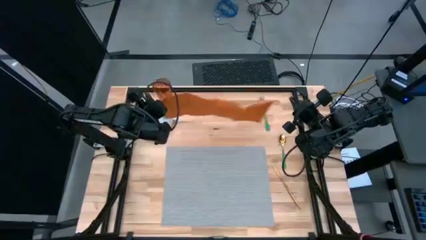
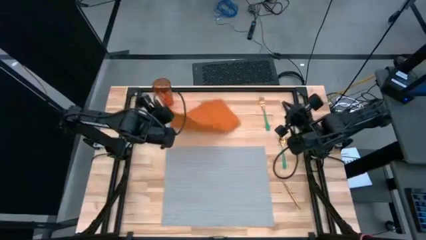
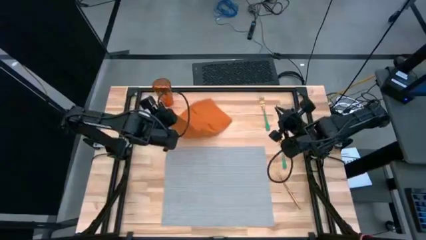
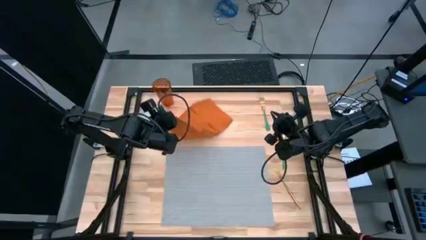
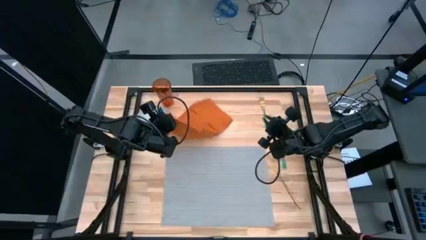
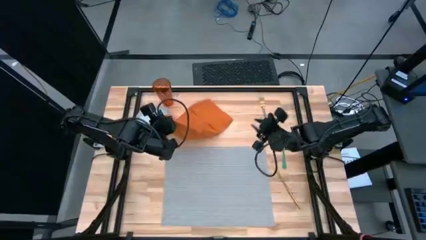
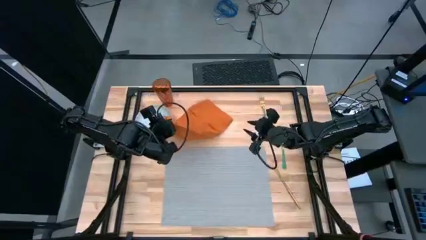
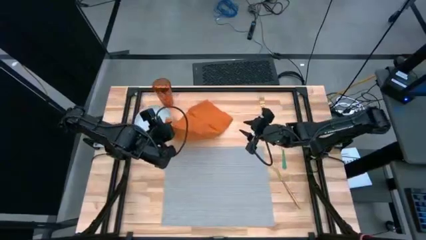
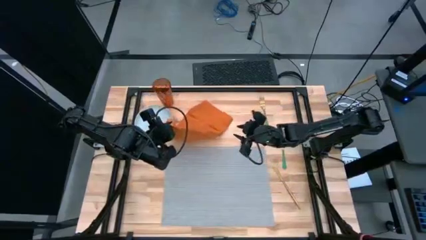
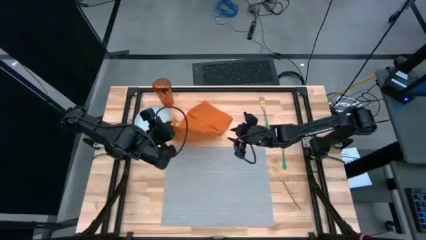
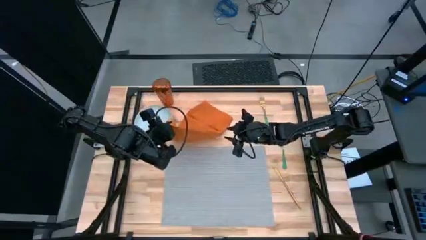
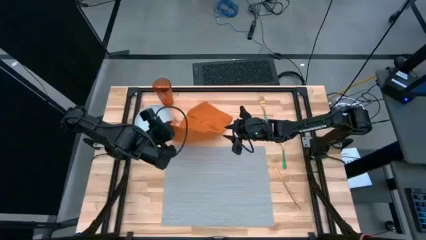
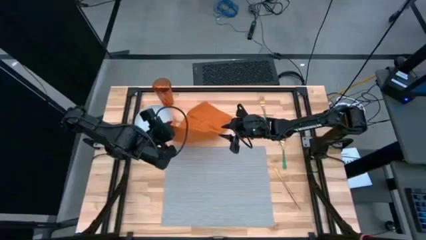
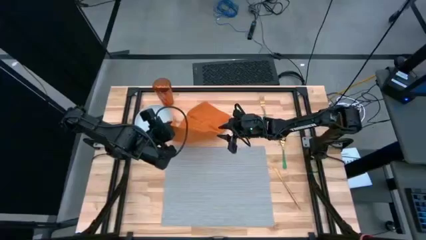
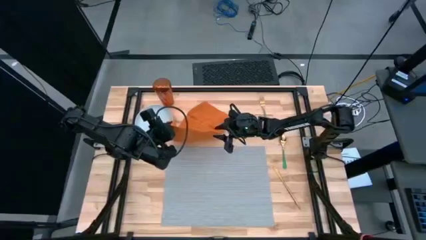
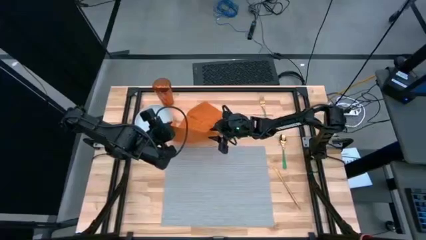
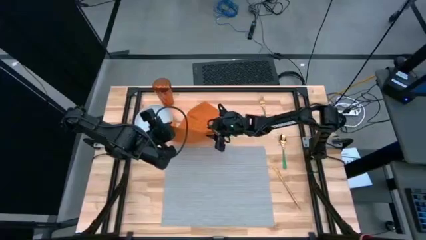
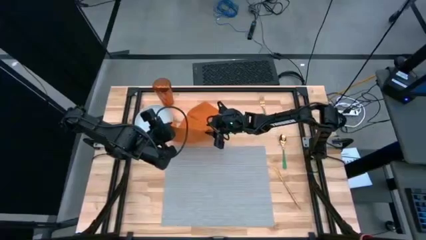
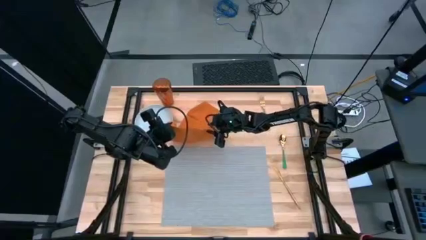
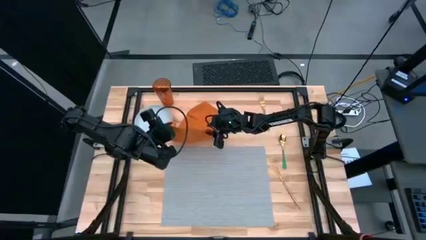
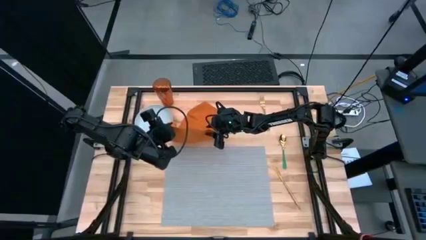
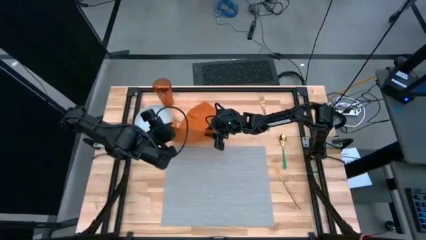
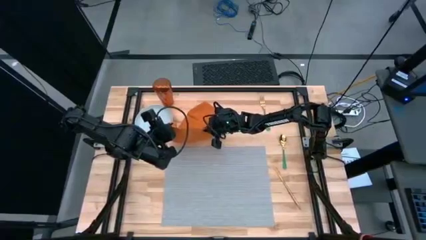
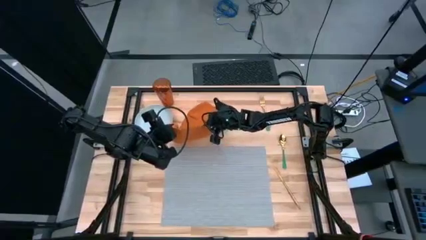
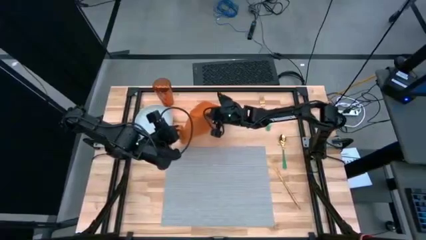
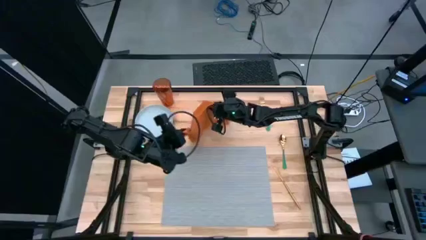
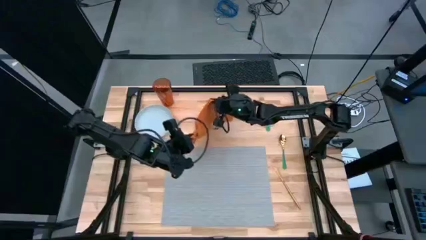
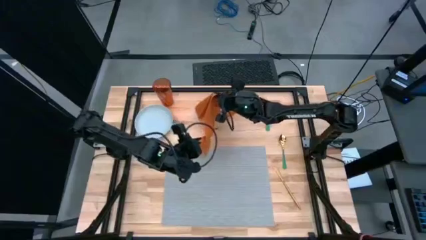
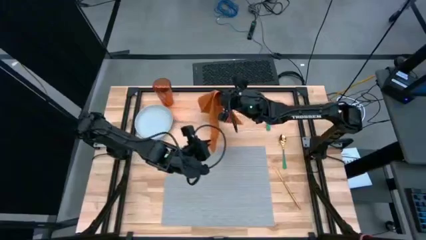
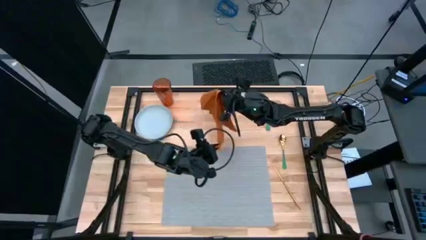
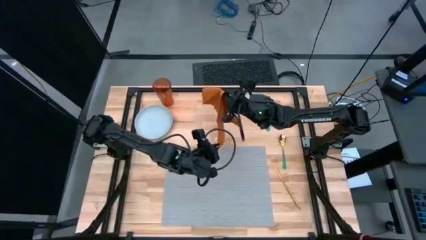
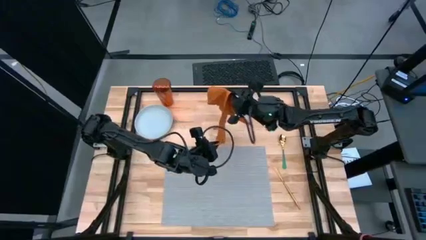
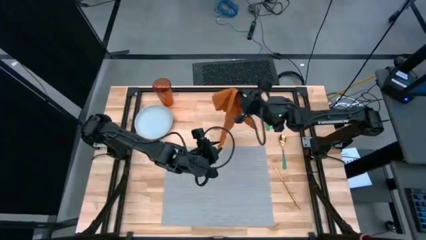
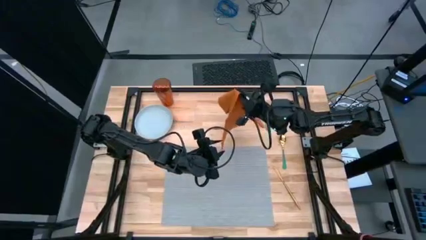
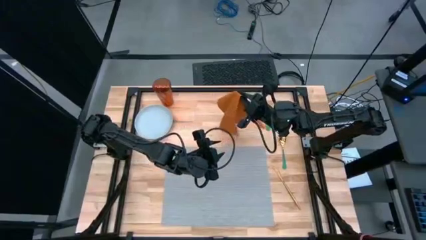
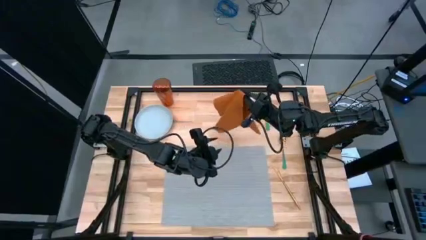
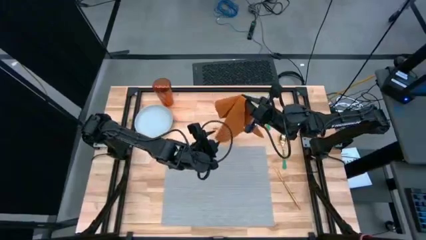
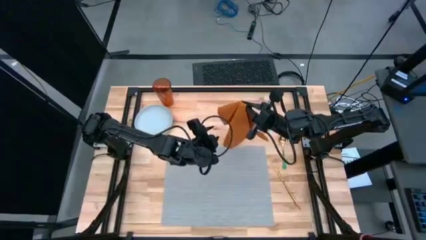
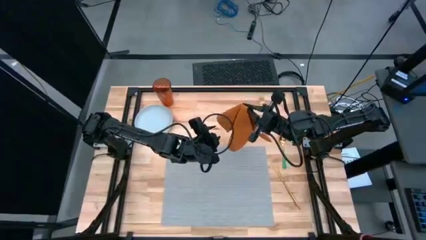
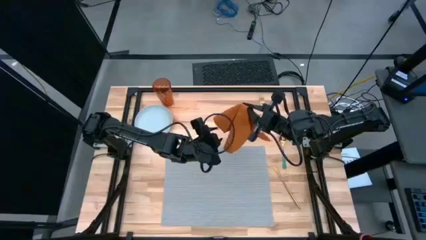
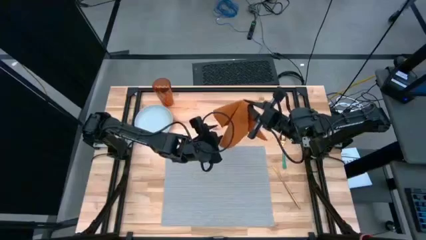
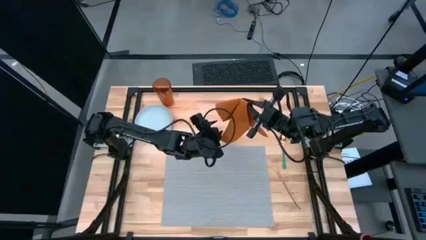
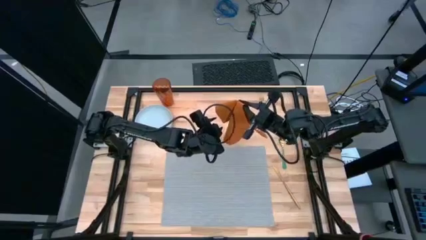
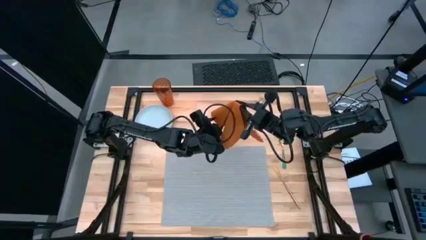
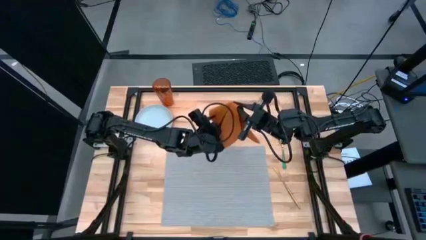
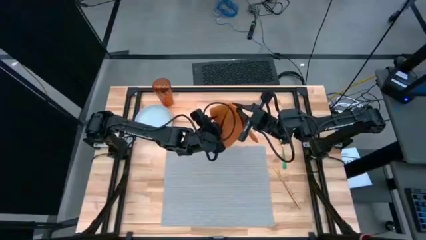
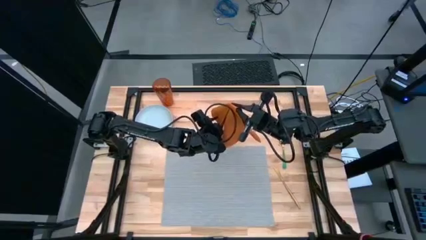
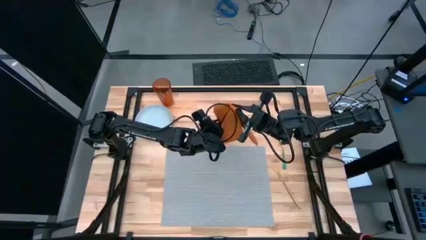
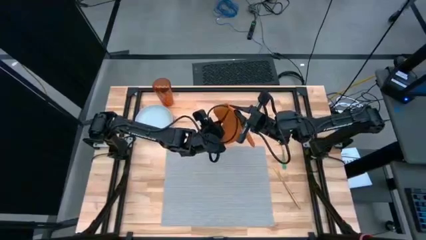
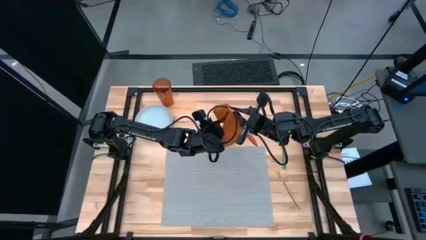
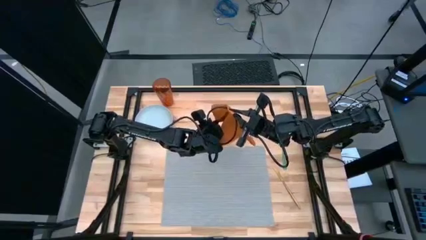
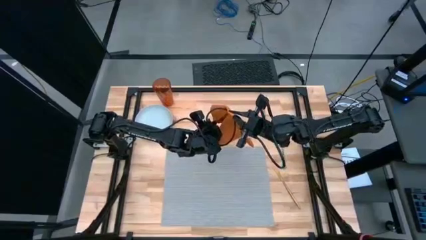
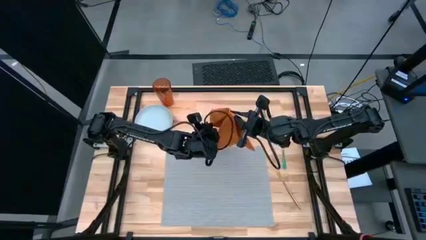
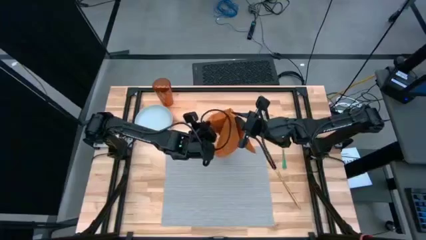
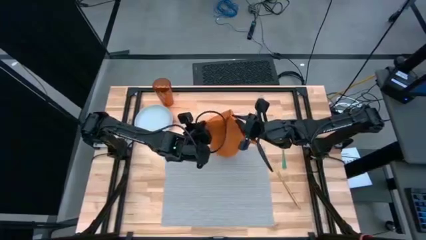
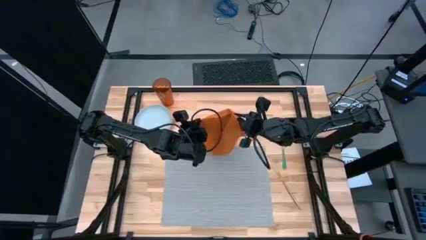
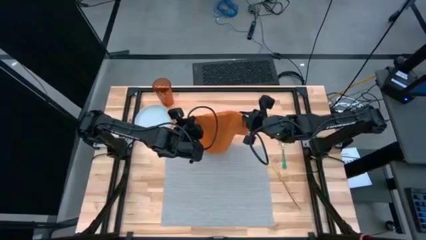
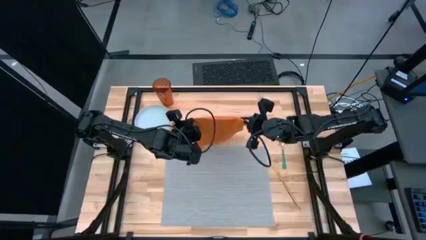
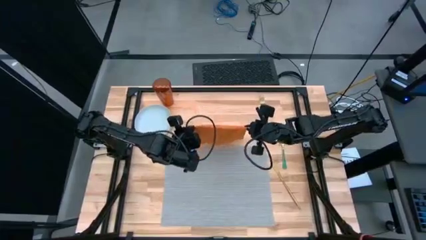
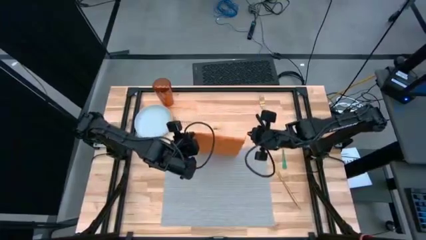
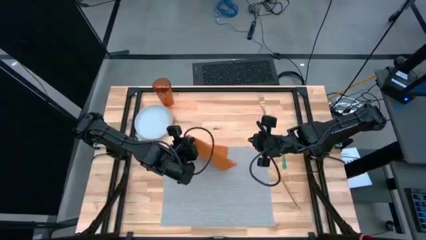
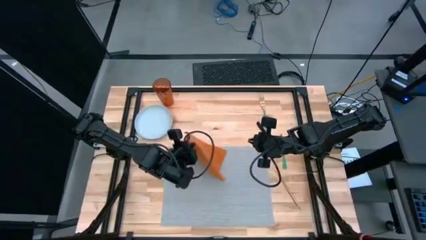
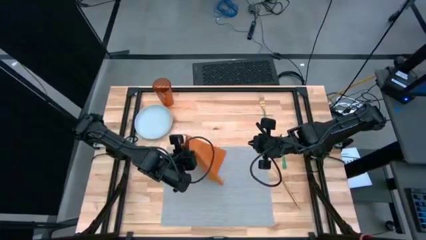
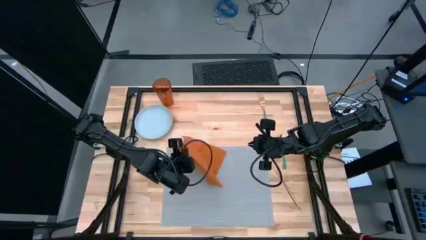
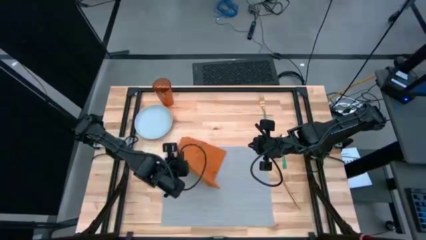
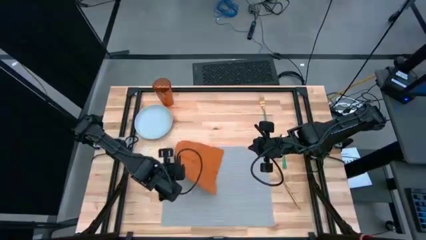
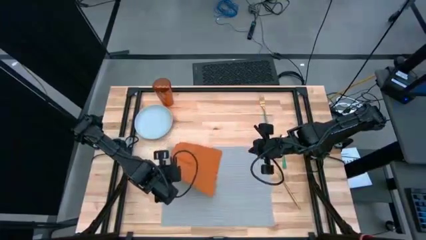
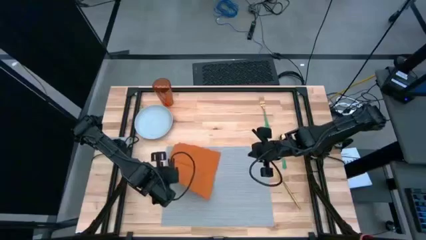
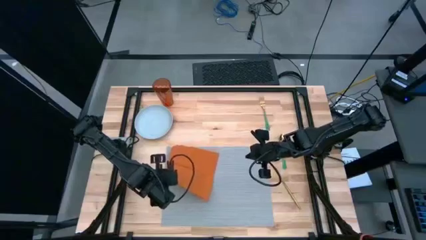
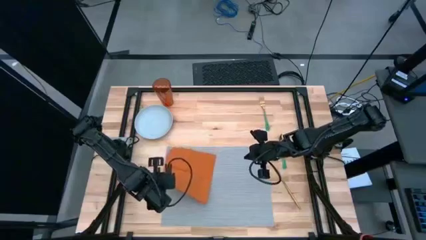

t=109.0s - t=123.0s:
Task: Set table place
Fold the orange napkin

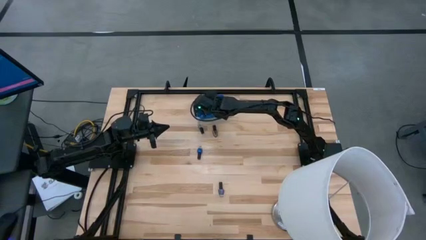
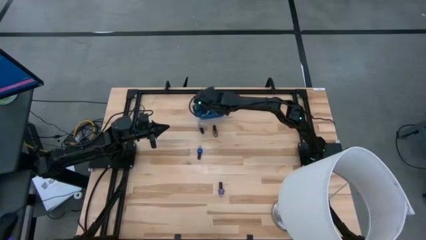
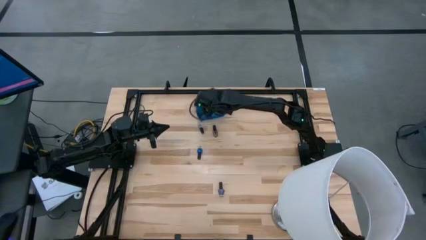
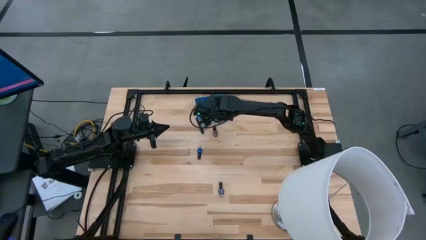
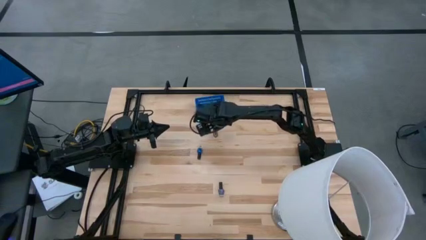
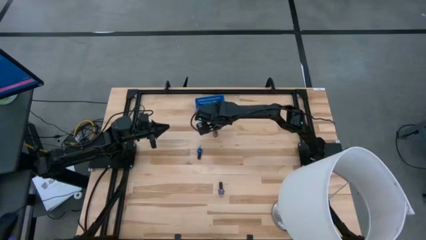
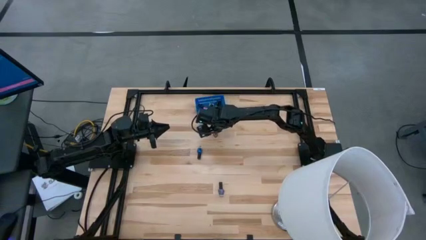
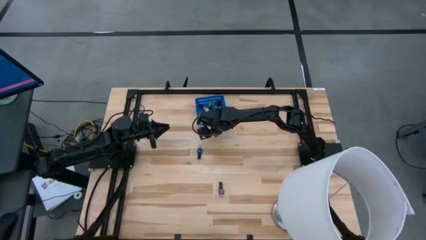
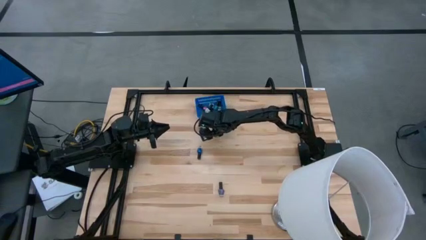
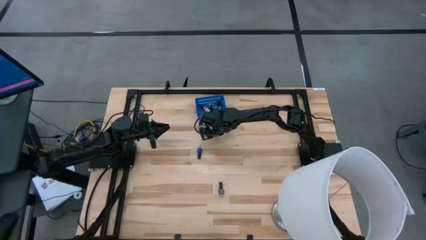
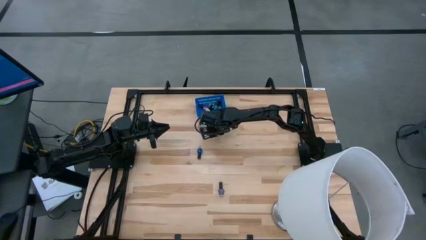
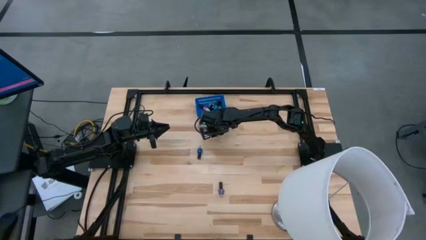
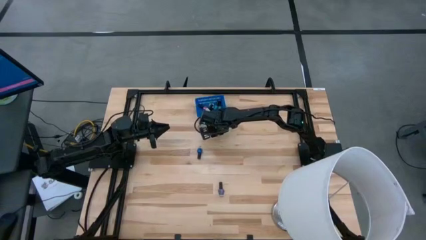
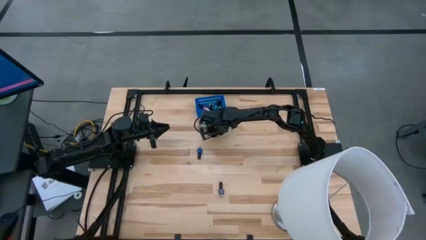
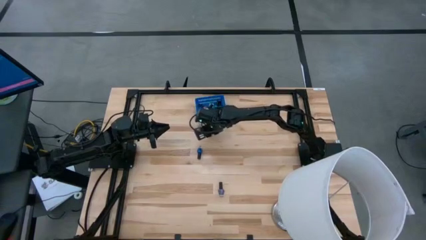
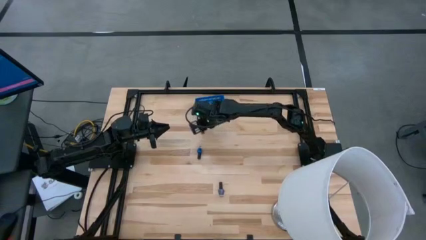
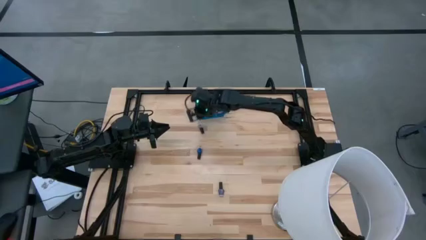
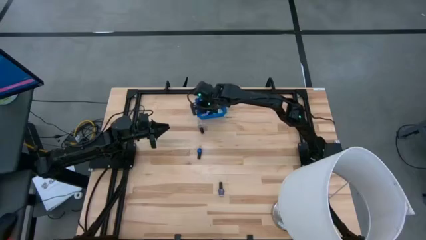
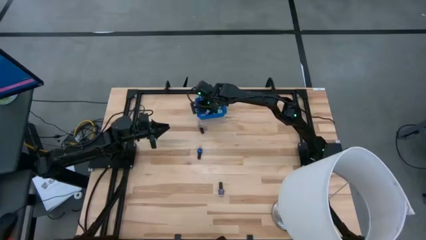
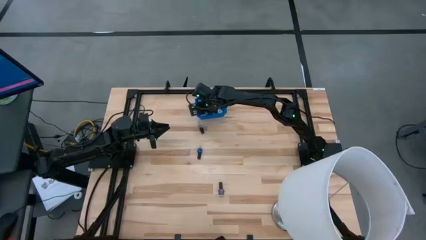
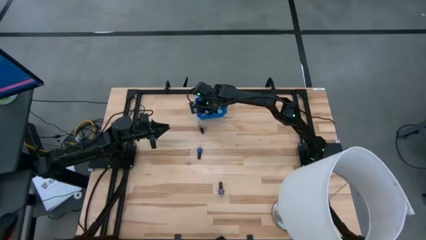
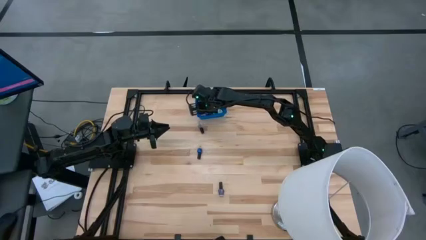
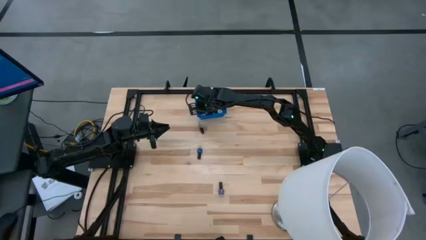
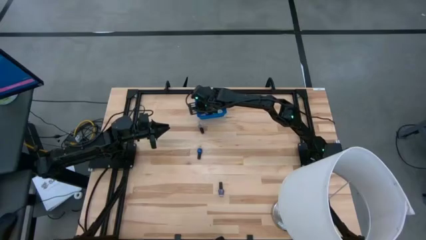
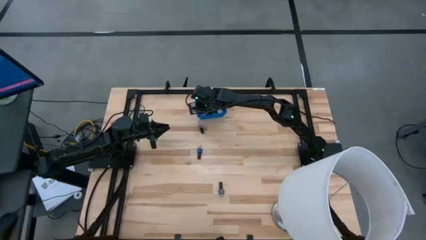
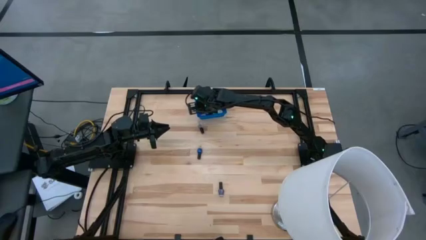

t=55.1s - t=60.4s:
Task: Pick & Place Nail Polish
Put the brown nail polish bottle into the blue basket
